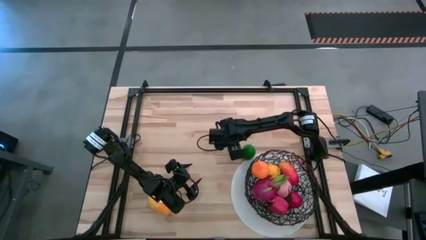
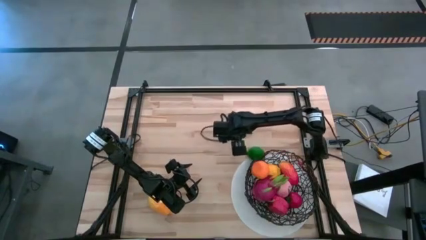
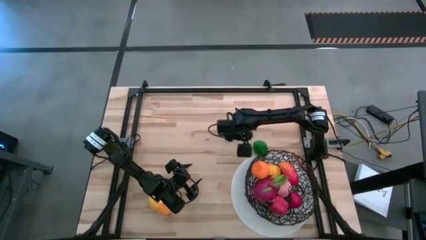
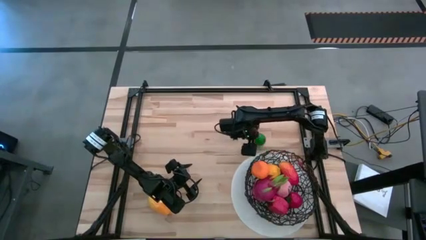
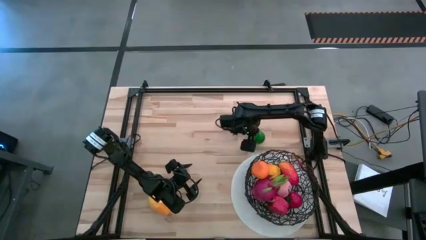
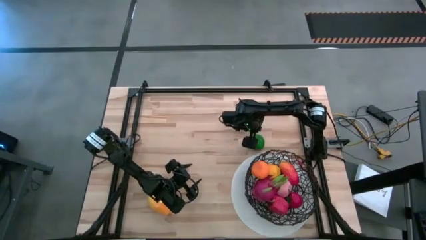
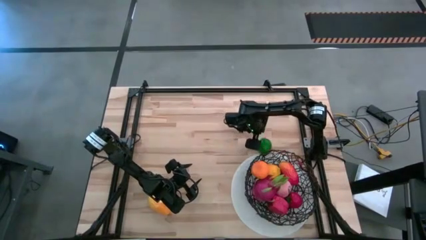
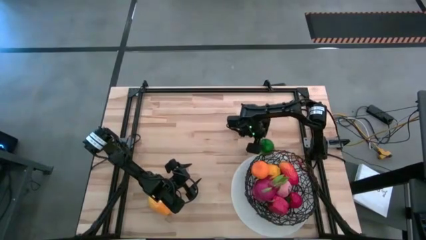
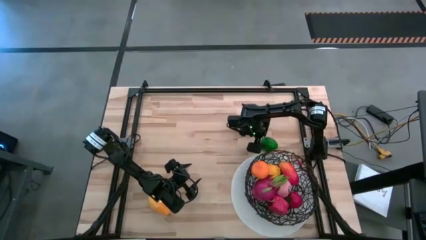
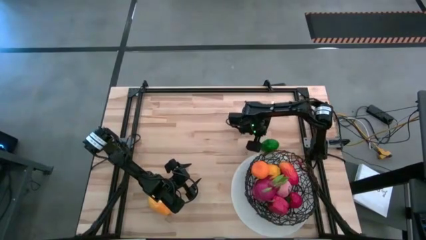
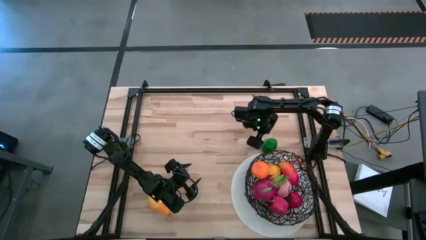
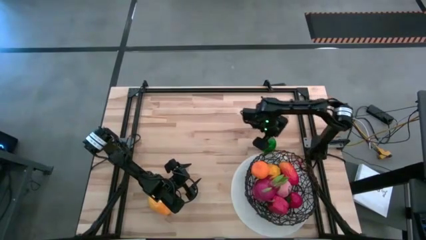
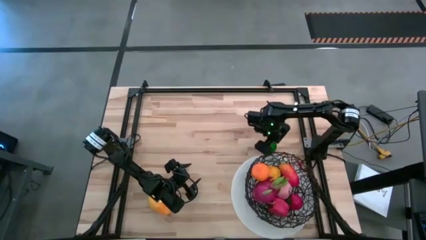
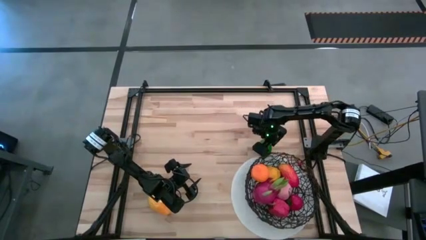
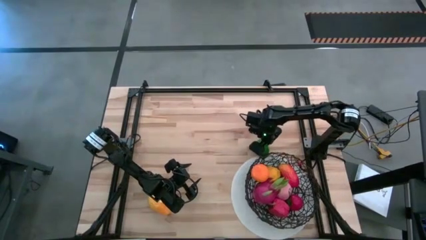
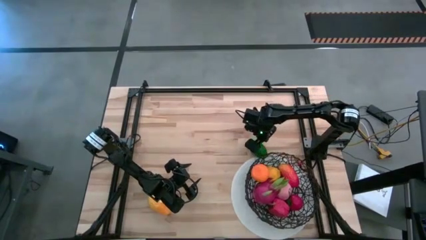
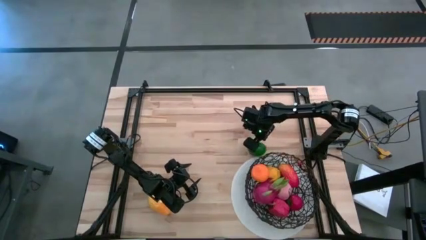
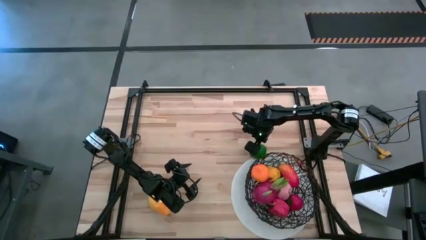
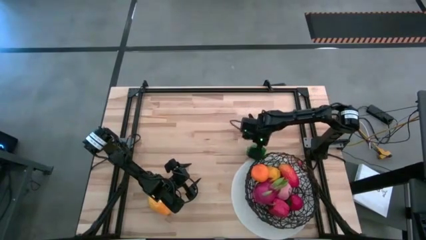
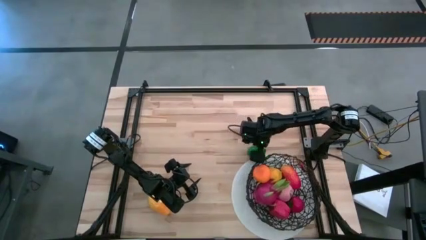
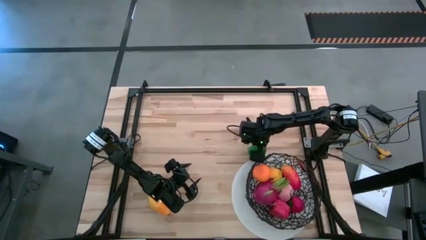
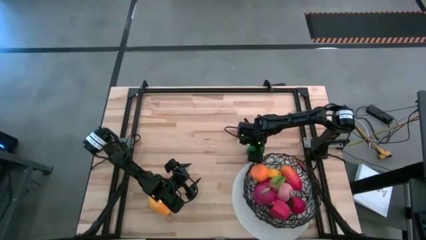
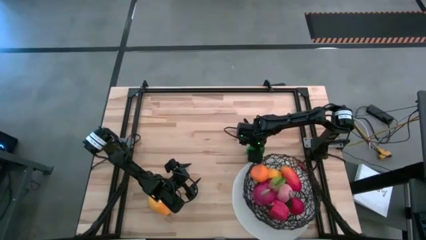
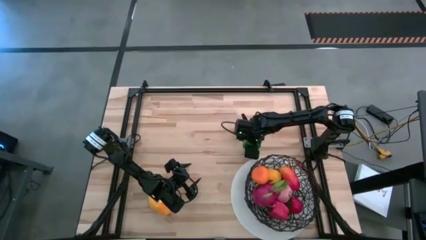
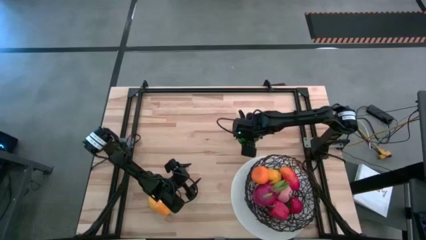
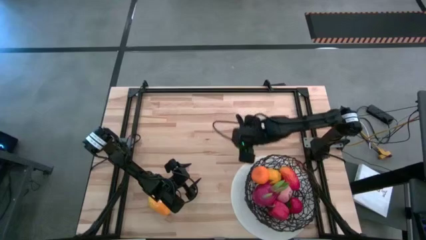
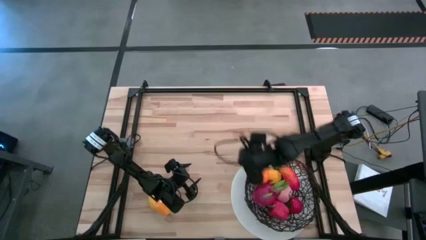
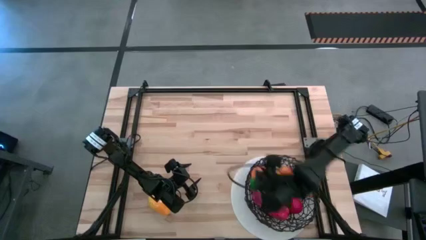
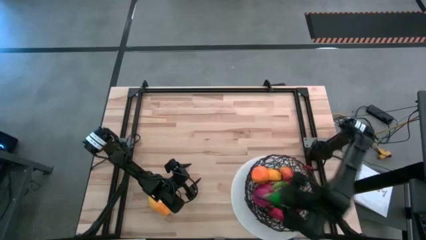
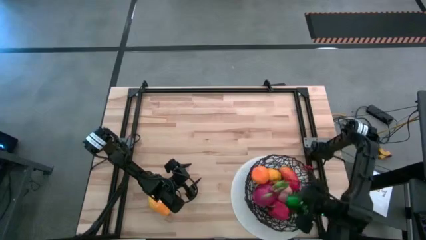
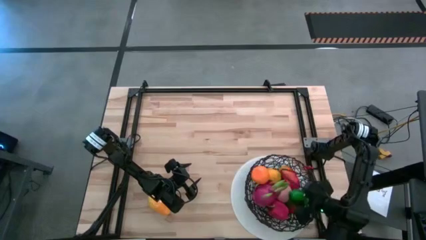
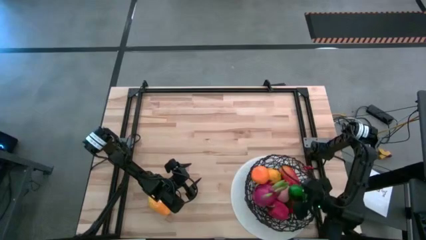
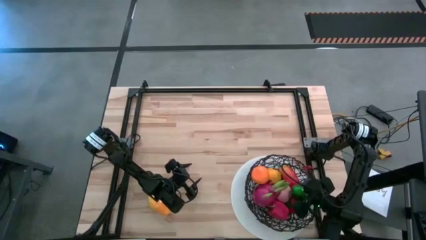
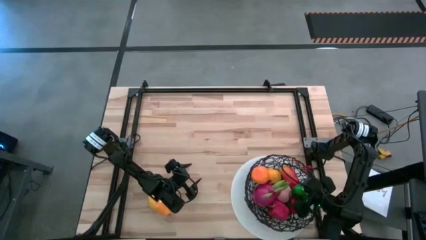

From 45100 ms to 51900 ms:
Task: Build produce basket
Put the green lime into the black wire basket

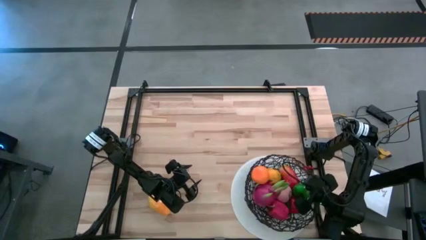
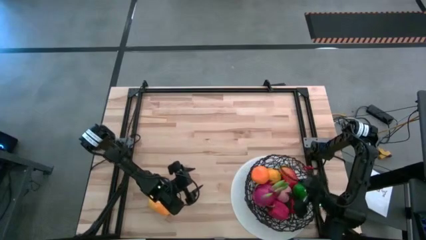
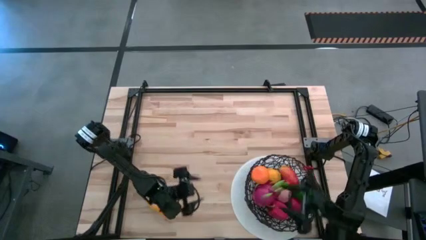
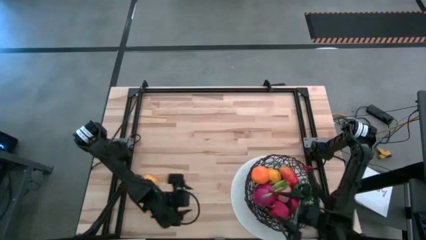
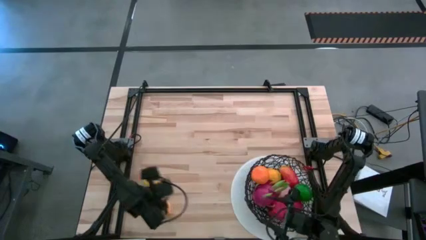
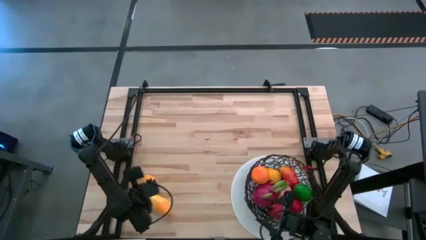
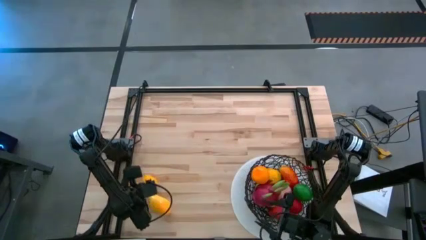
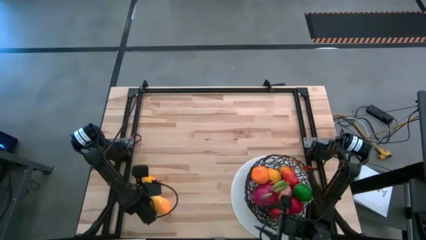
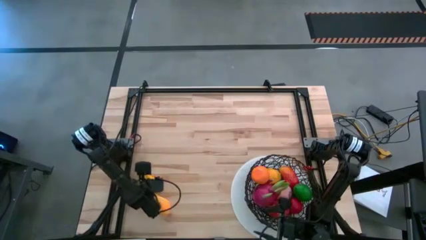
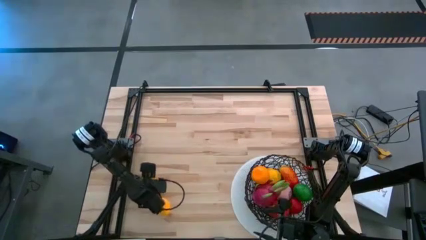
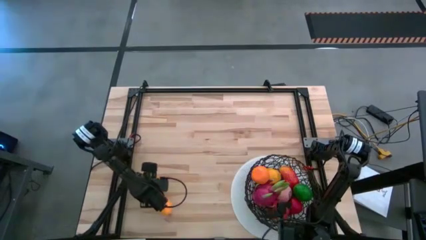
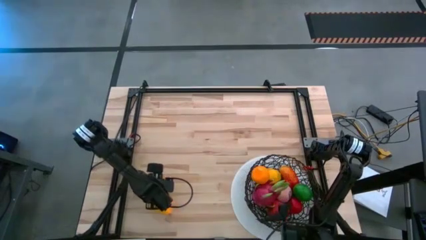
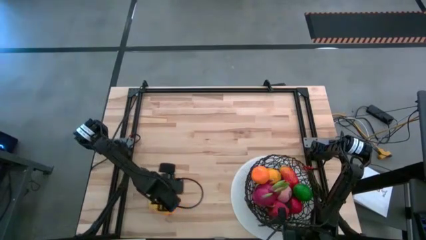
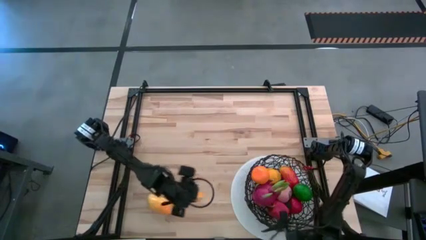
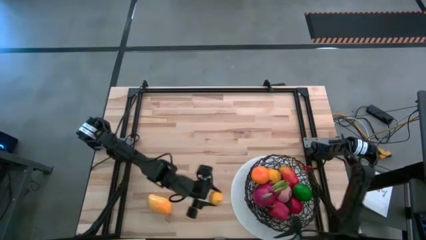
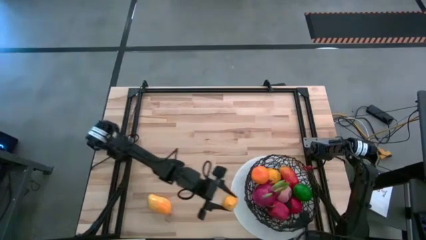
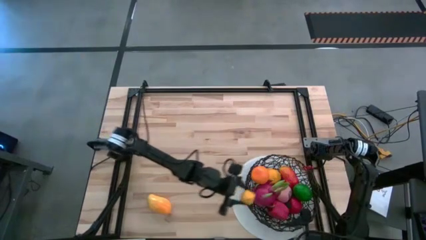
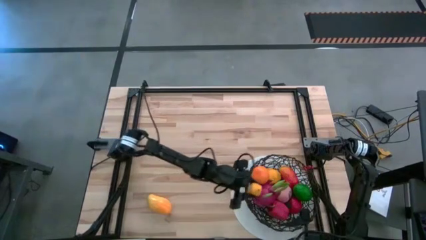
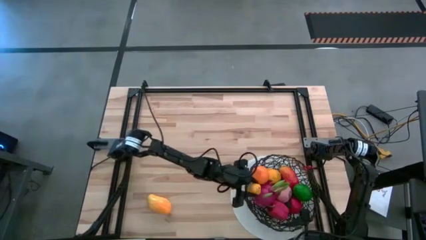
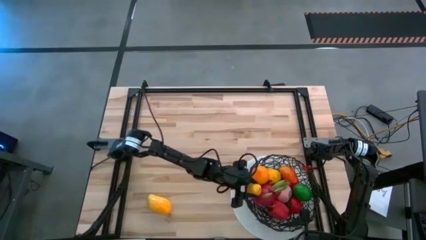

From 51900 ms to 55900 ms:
Put the yellow lemon into the black wire basket

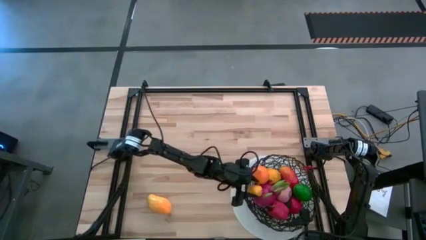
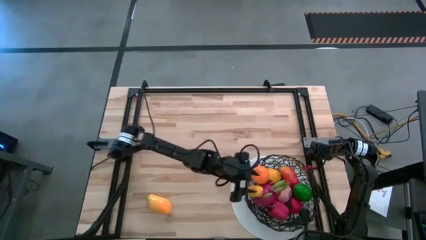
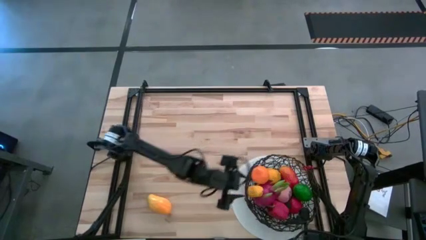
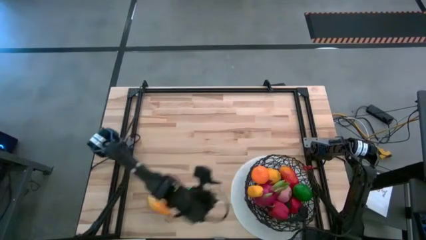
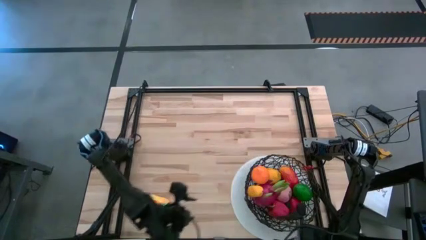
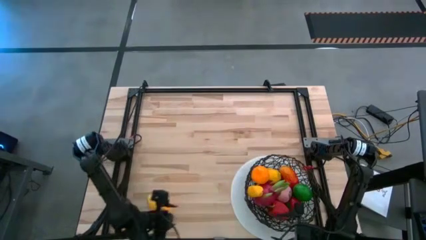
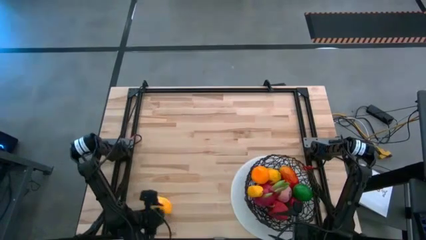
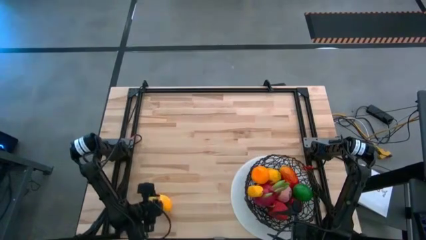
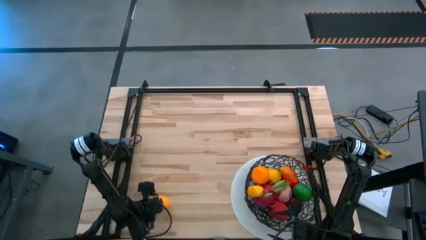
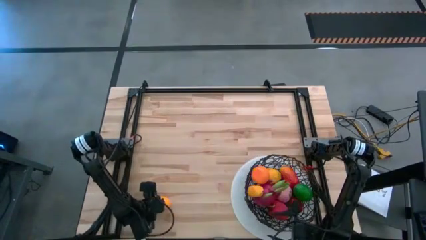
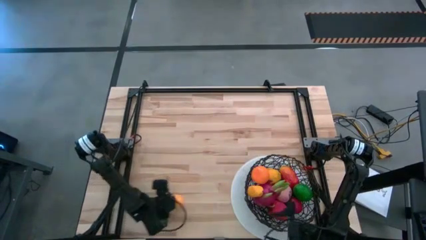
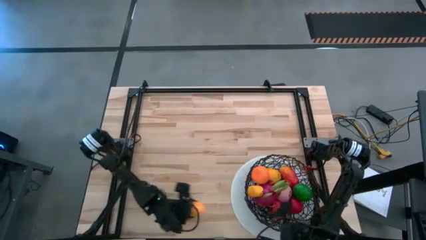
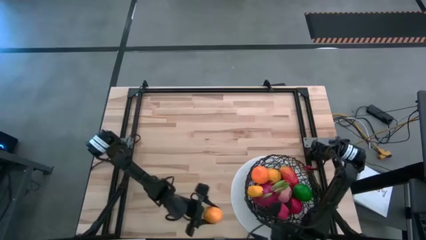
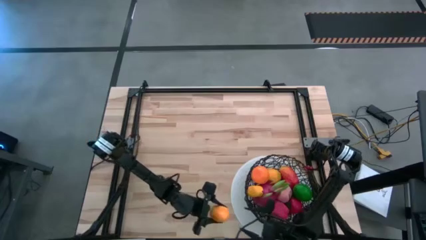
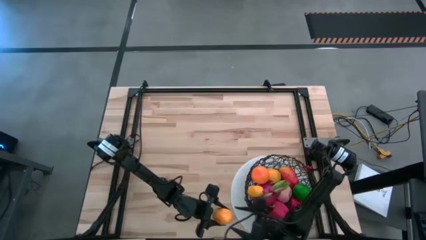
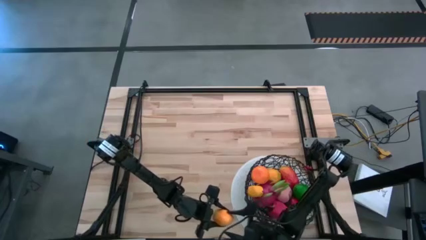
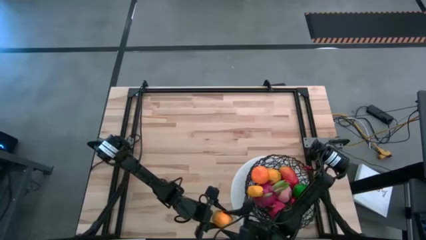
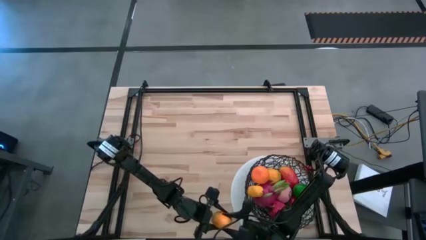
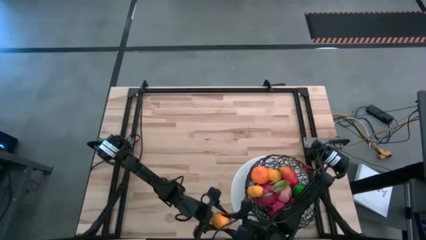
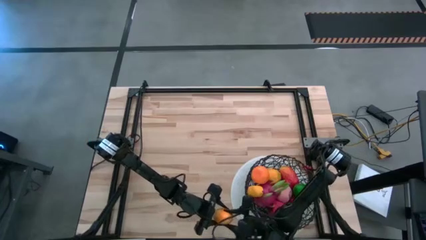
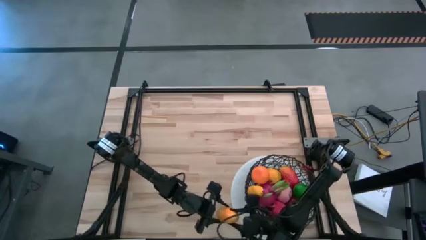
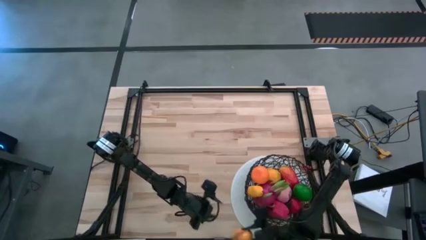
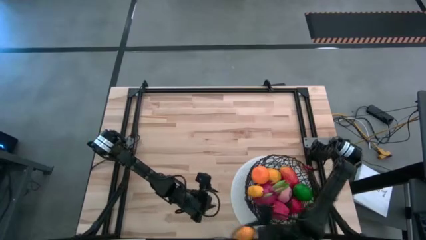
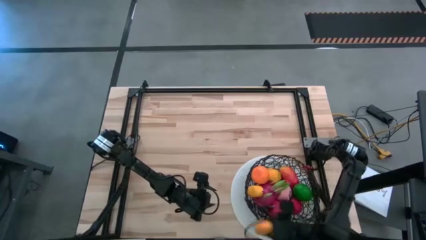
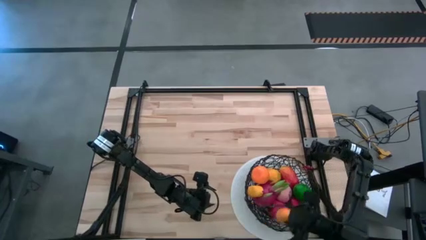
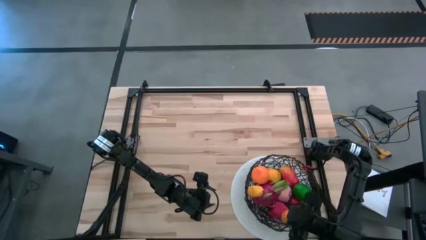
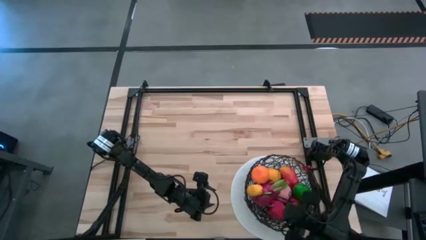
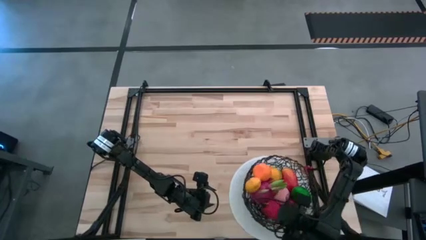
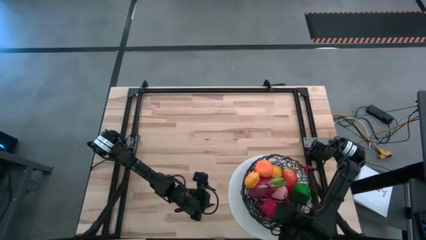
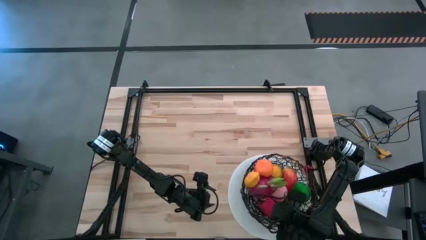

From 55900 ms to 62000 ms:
Put the yellow mango into the black wire basket
